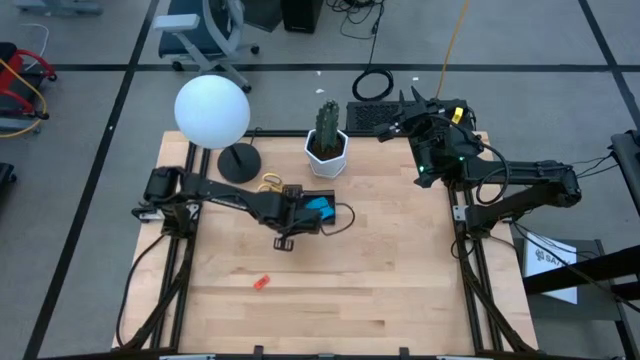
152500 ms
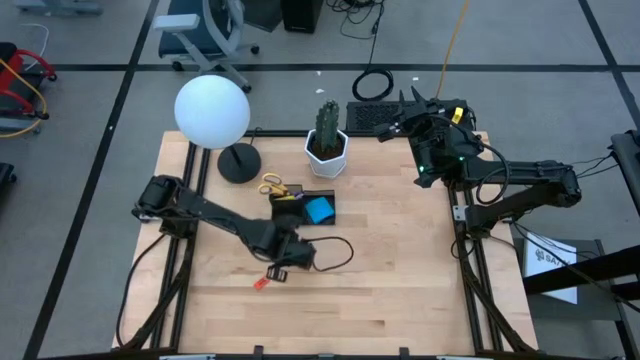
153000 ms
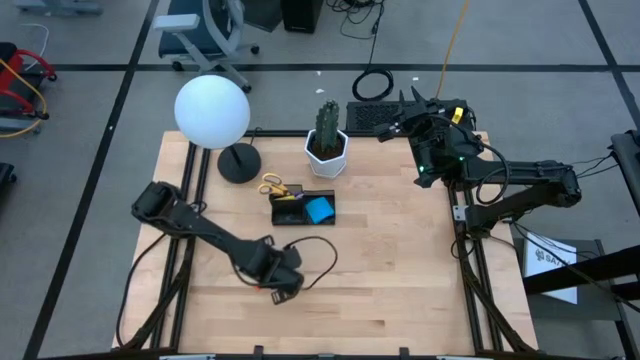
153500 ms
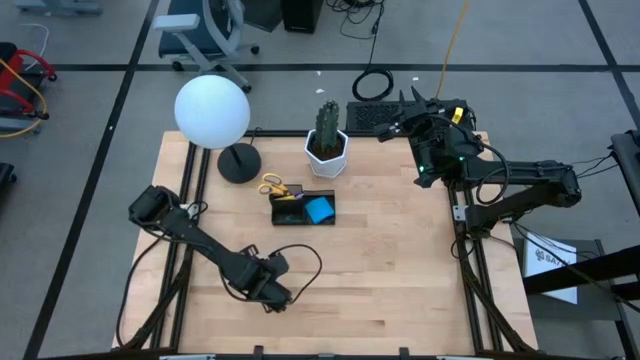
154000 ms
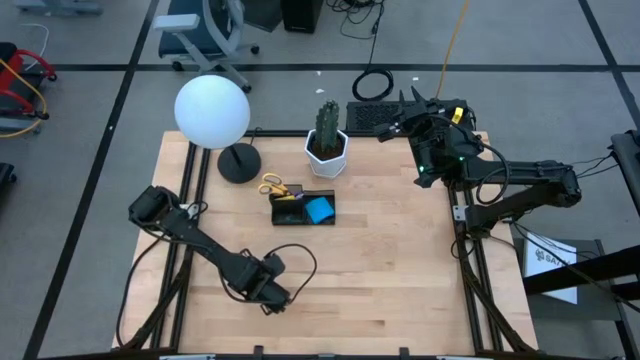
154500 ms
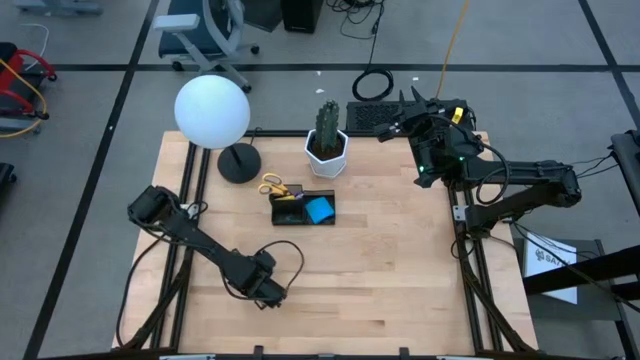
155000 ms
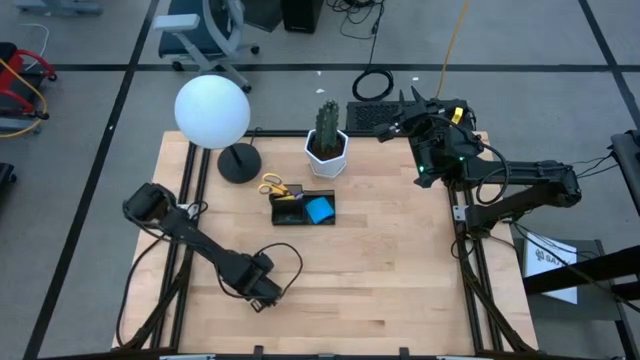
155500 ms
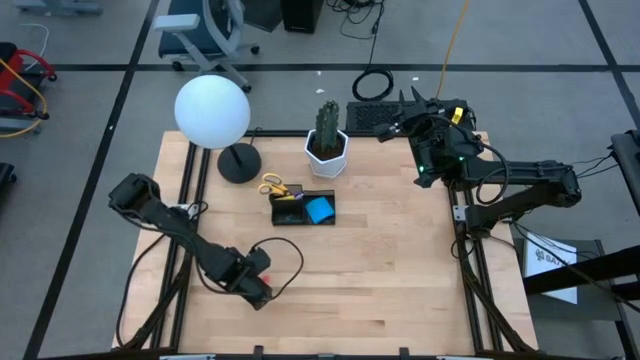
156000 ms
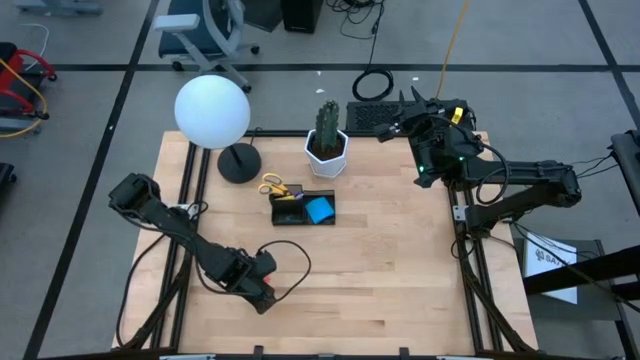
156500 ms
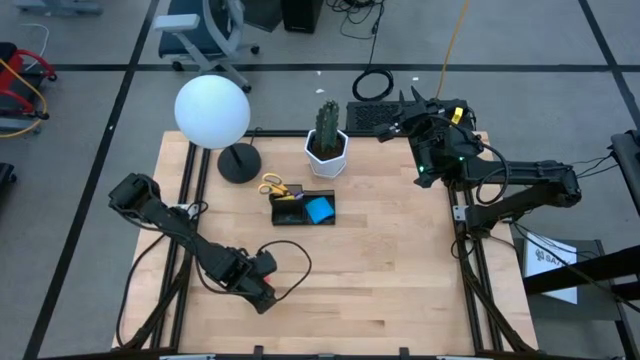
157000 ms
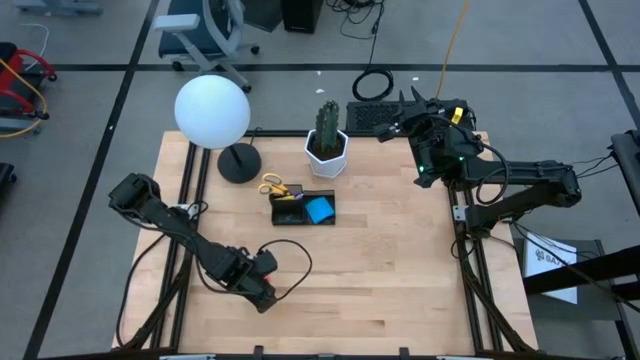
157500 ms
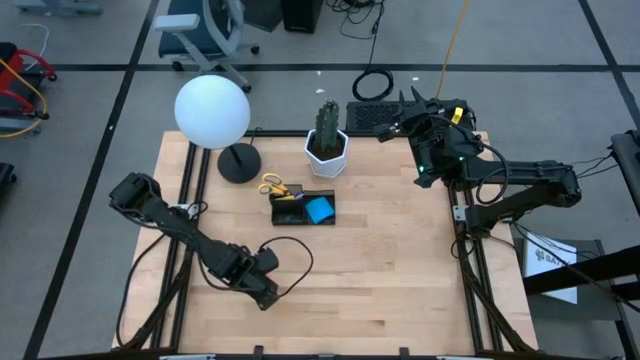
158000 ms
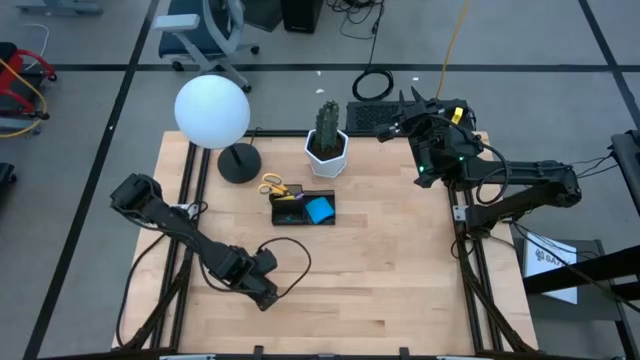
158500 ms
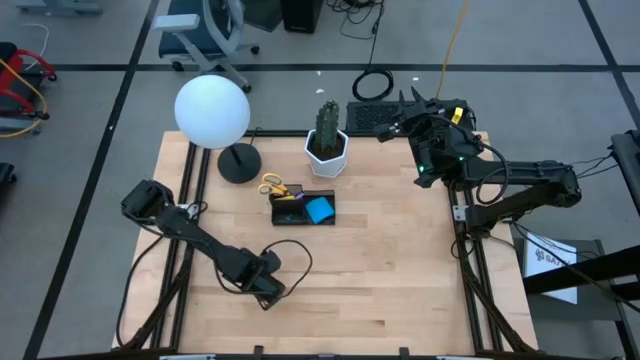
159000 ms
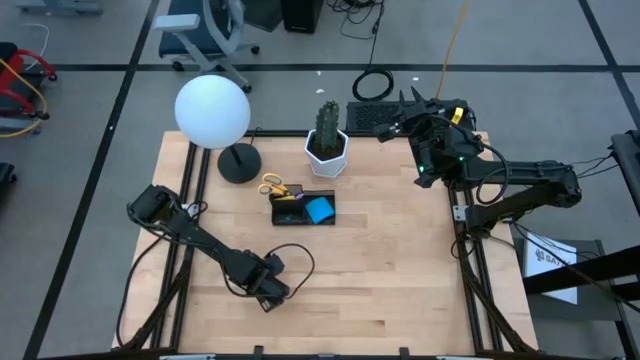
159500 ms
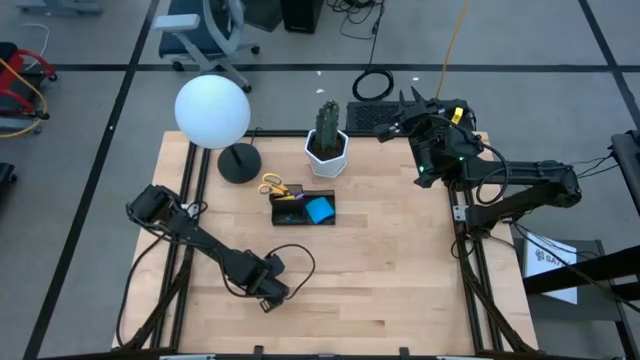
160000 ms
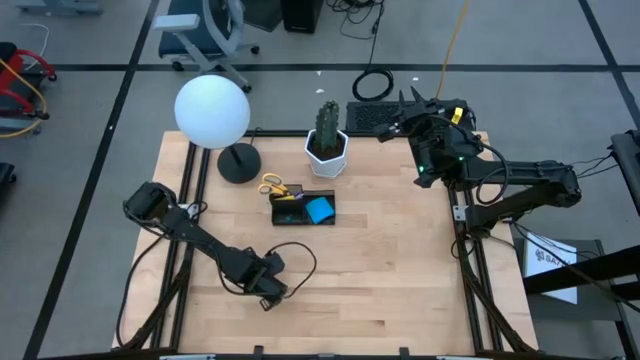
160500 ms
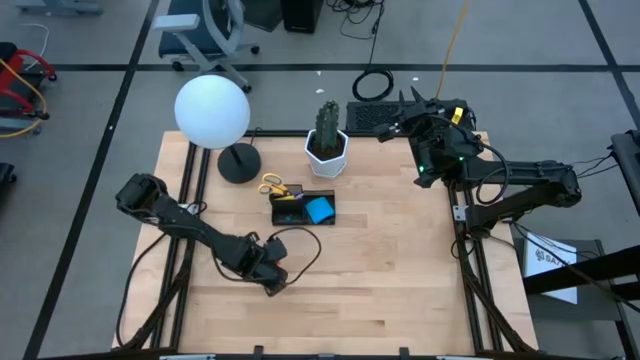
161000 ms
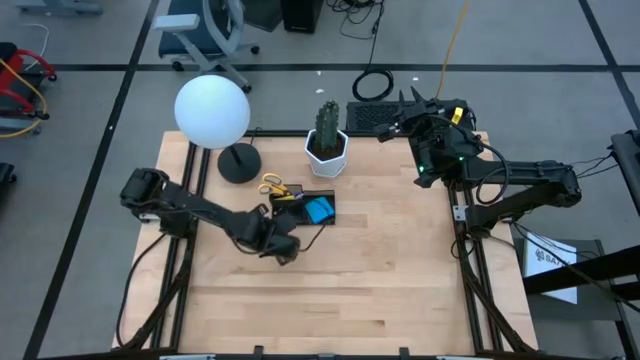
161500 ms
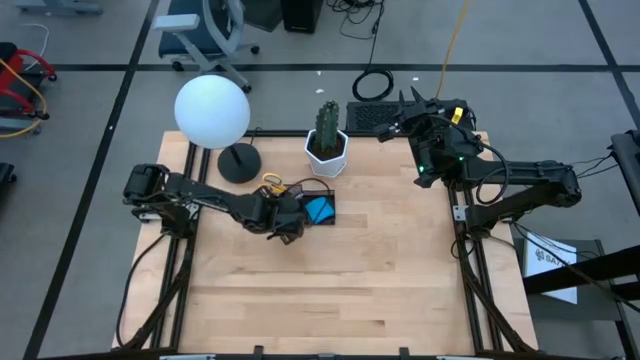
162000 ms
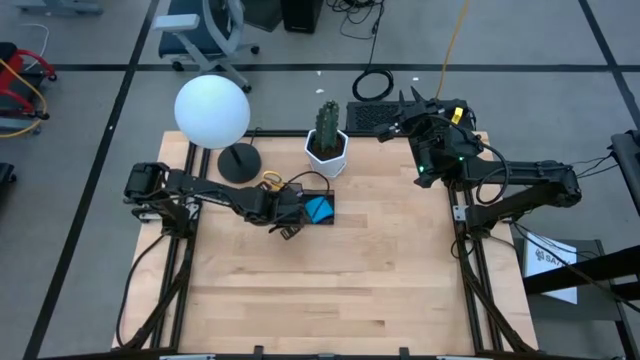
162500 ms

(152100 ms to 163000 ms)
Task: Pick and place office supplies into organizer
Put the eraser into the desk organizer

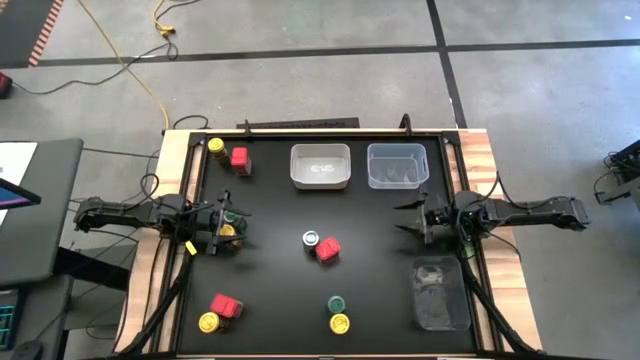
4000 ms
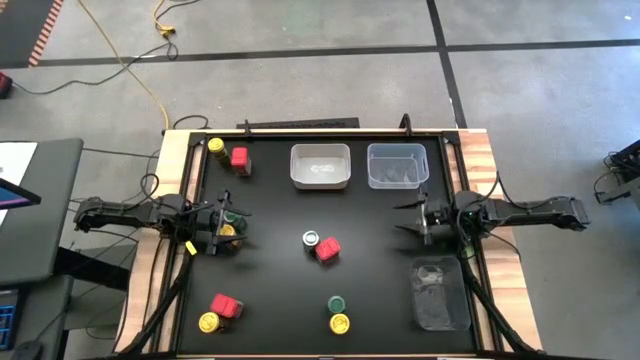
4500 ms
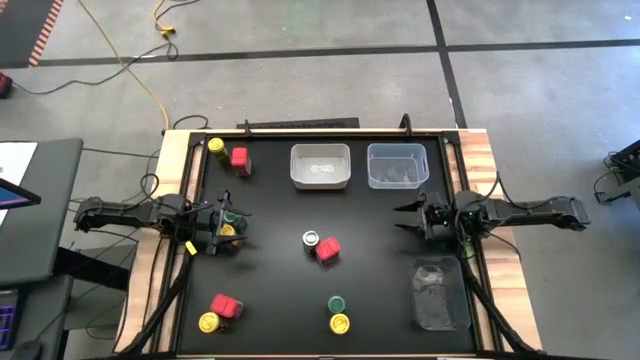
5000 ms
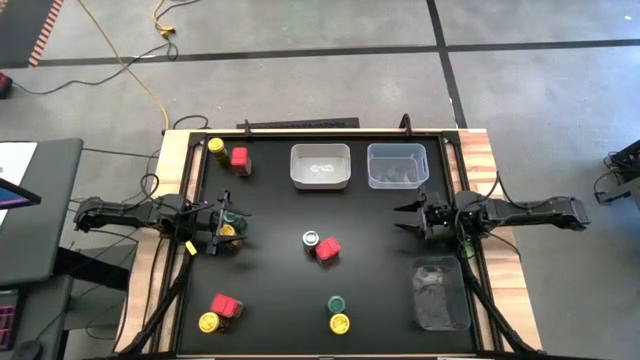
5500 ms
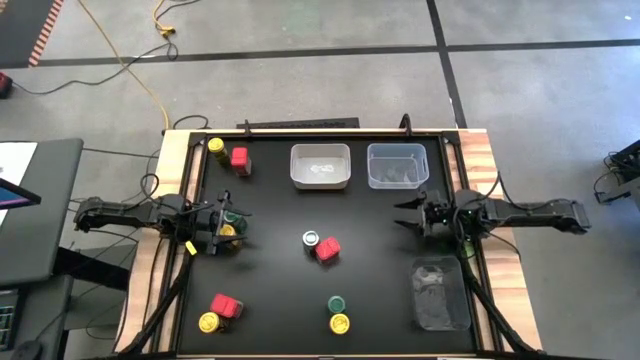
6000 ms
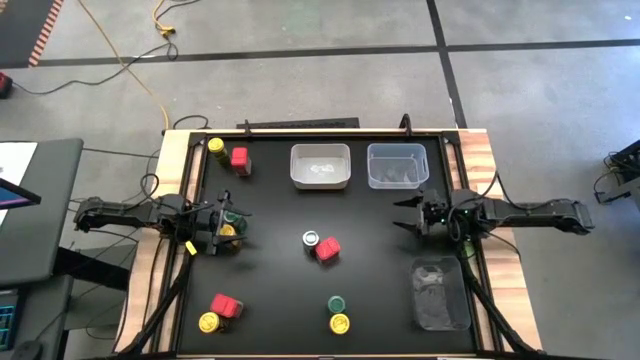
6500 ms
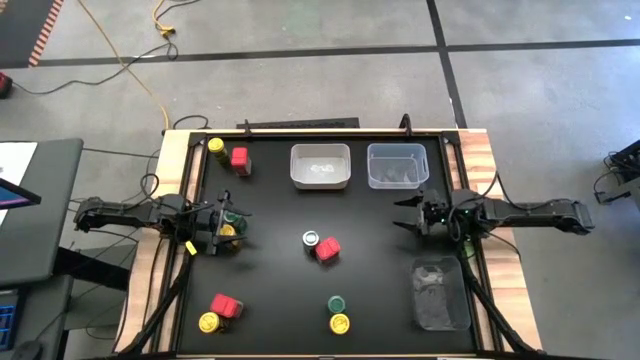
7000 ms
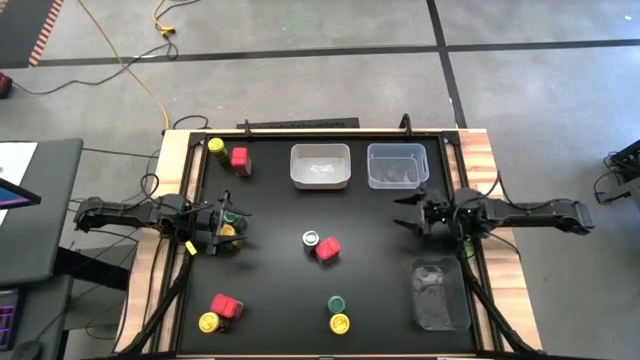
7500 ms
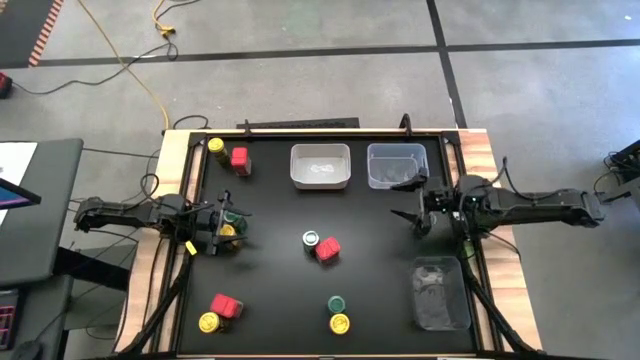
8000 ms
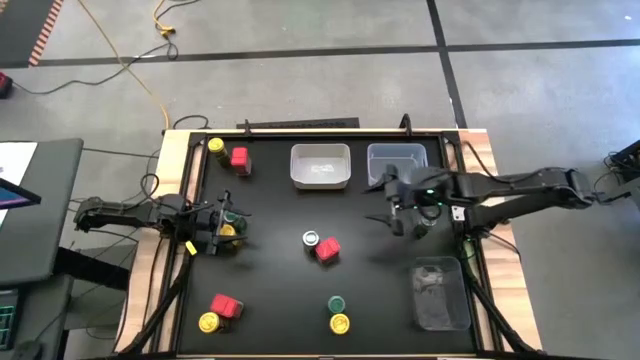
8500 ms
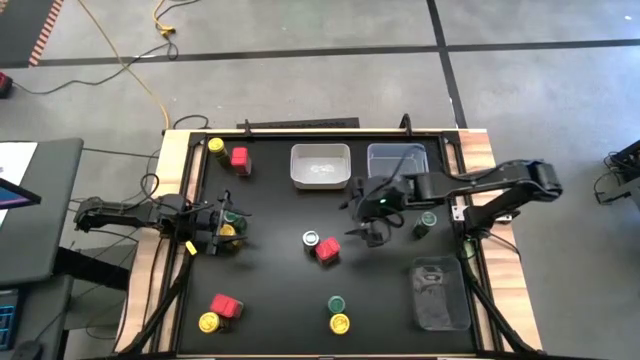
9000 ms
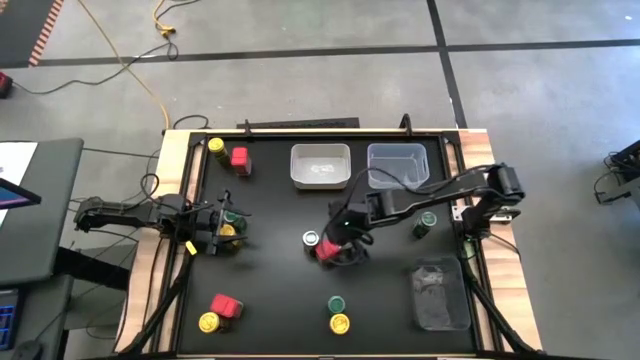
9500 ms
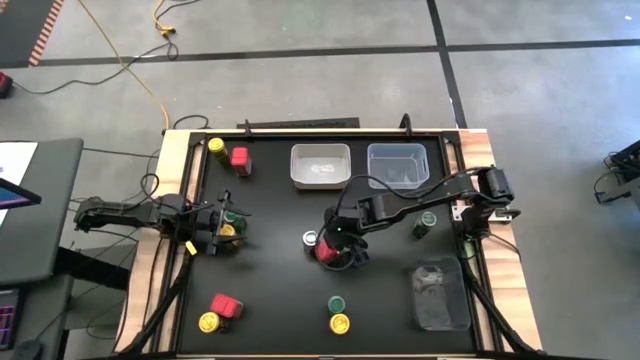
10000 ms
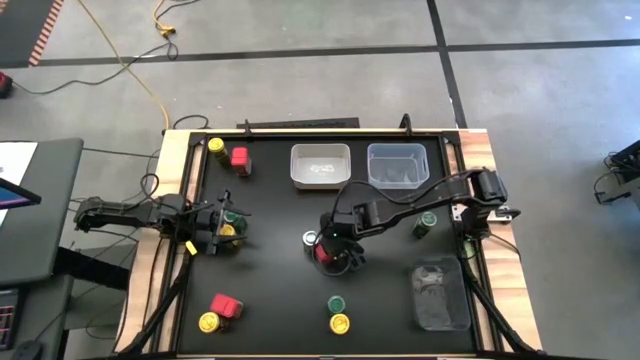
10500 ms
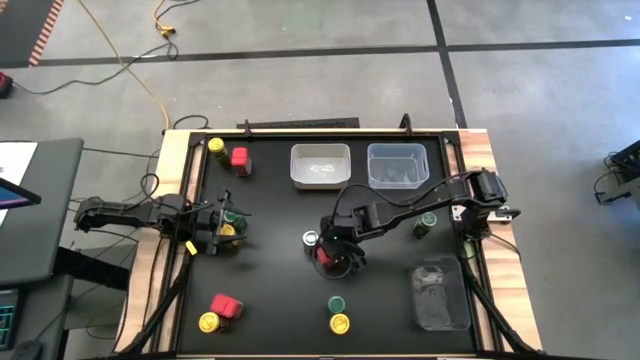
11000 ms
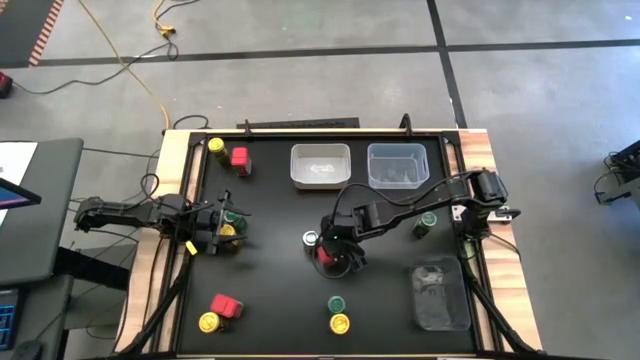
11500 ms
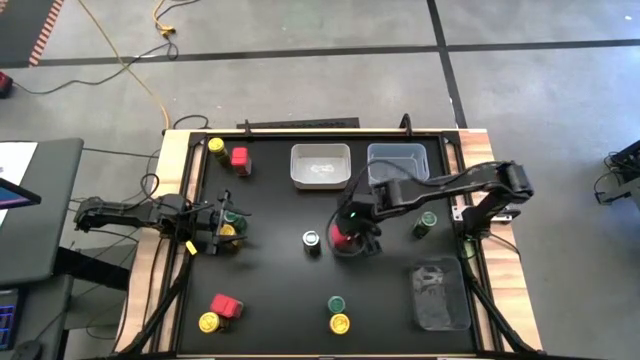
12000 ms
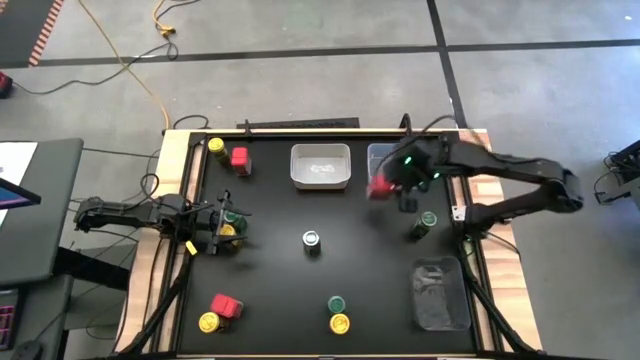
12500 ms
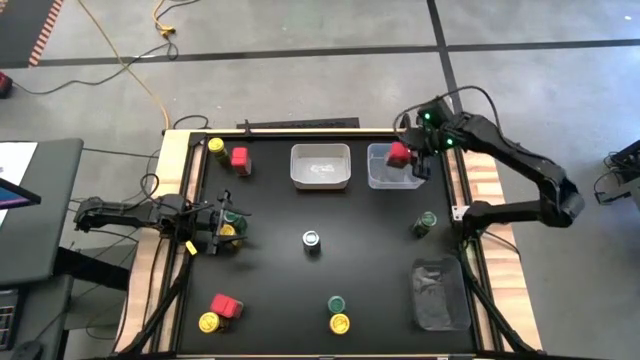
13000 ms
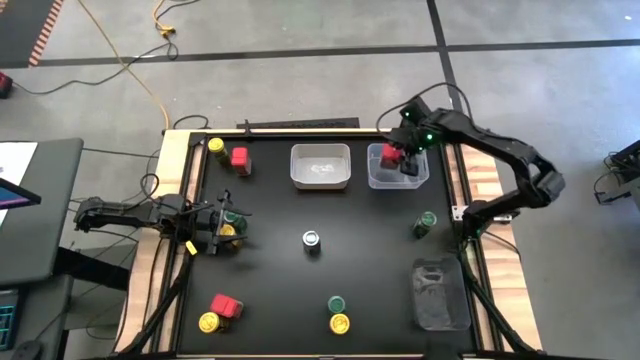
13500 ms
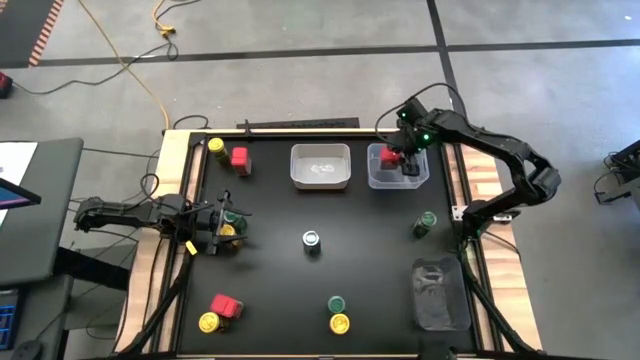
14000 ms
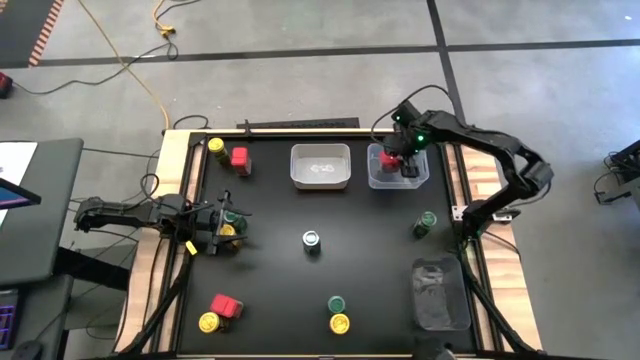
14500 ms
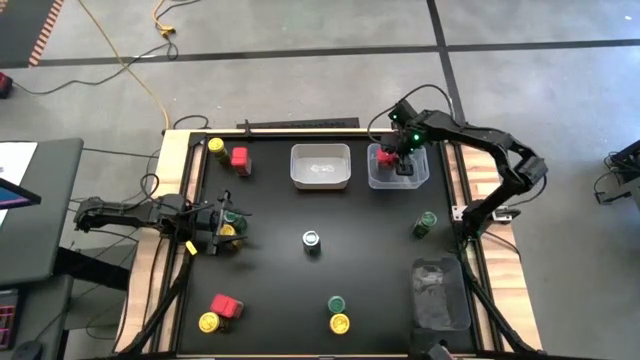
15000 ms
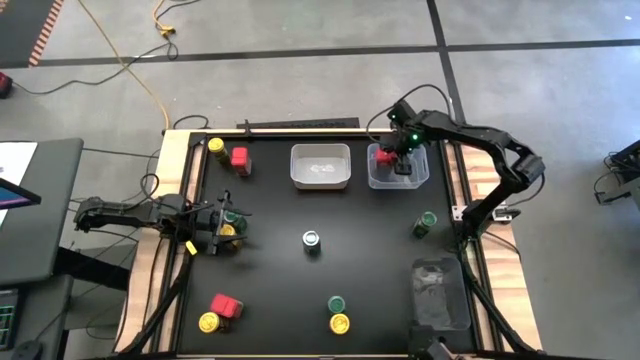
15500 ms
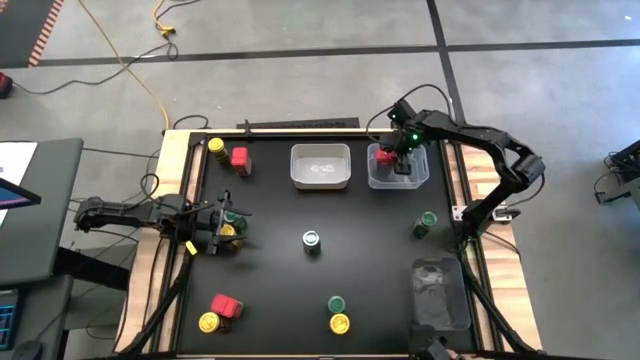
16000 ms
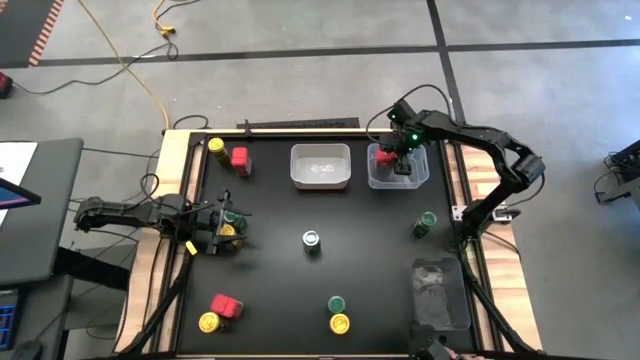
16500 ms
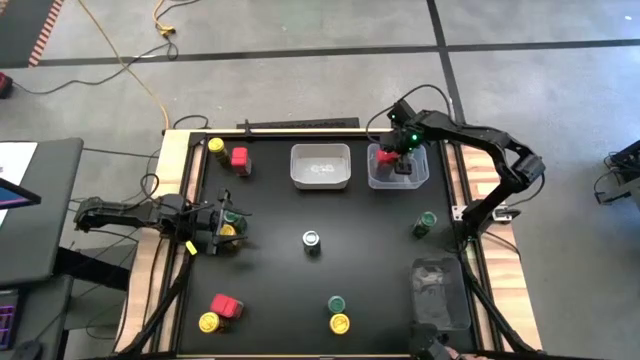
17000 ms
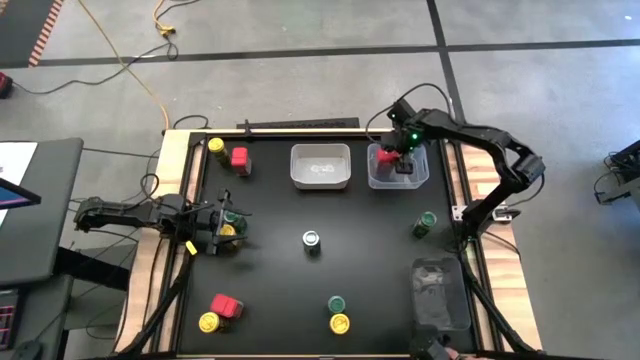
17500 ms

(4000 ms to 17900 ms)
Task: Sort spices by type
Put the middle red seasoning can into the transparent bin
